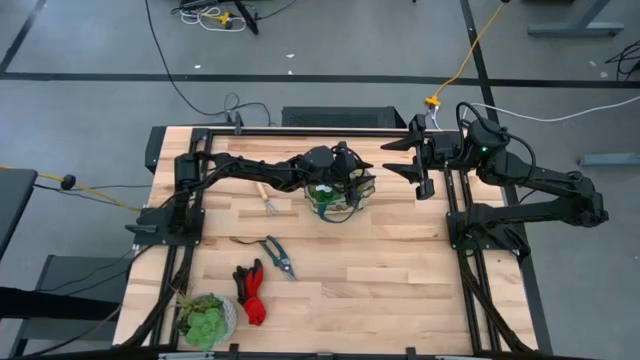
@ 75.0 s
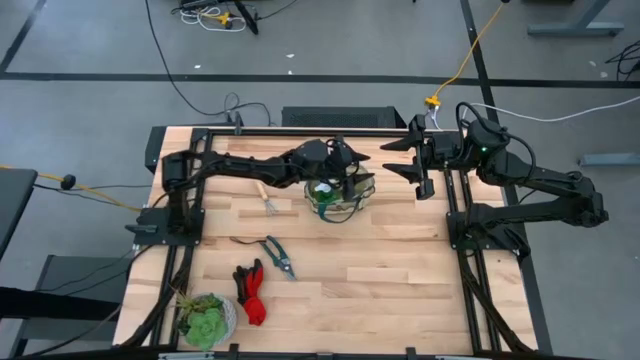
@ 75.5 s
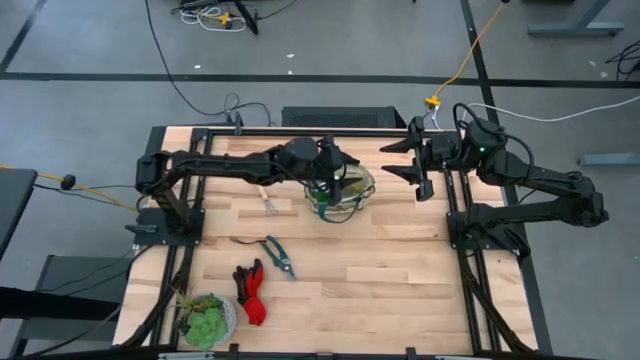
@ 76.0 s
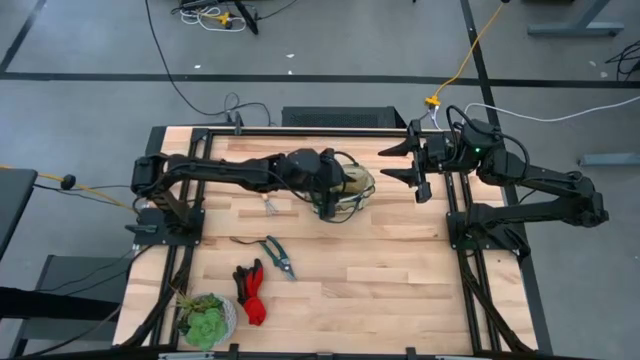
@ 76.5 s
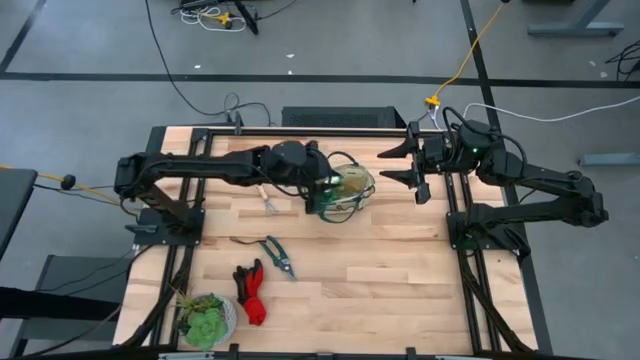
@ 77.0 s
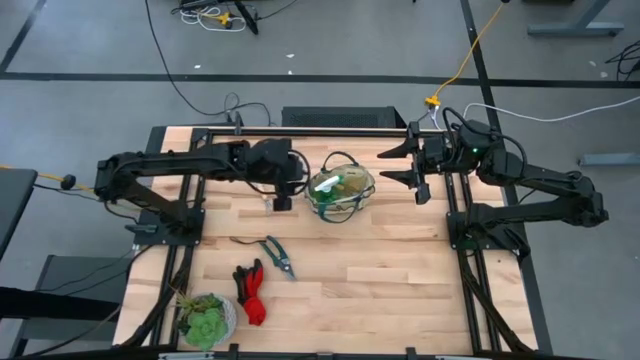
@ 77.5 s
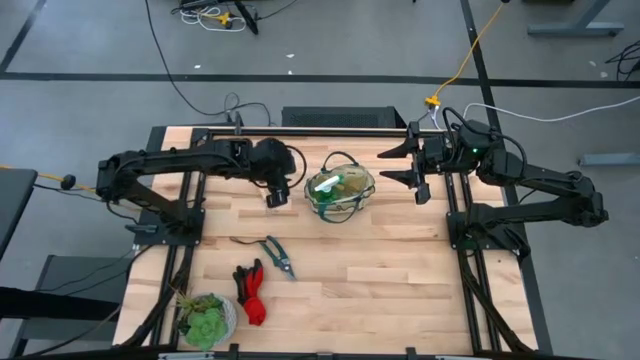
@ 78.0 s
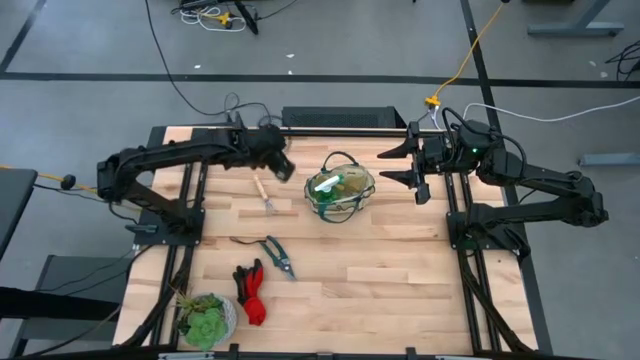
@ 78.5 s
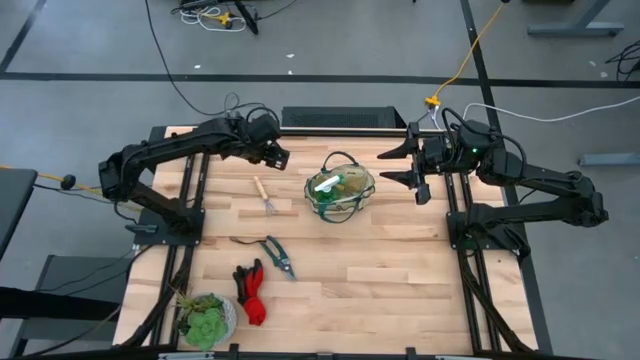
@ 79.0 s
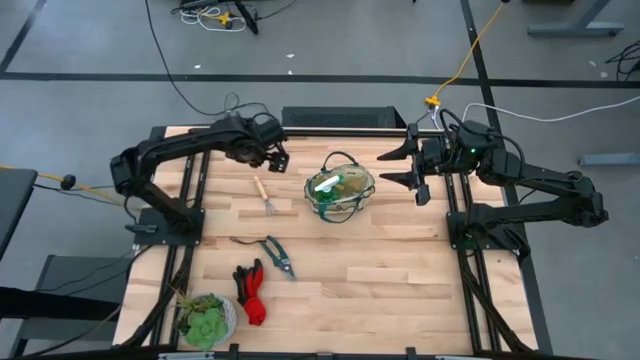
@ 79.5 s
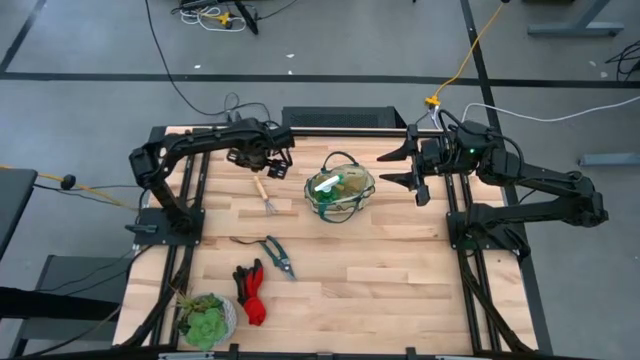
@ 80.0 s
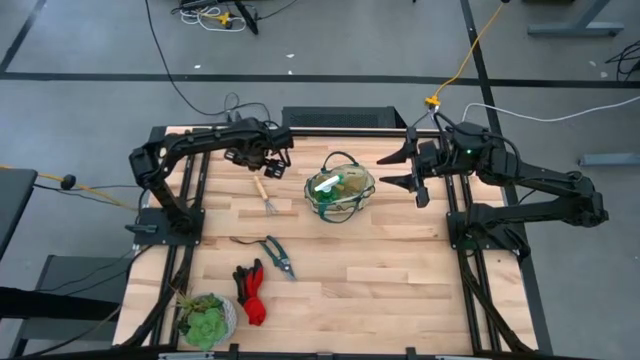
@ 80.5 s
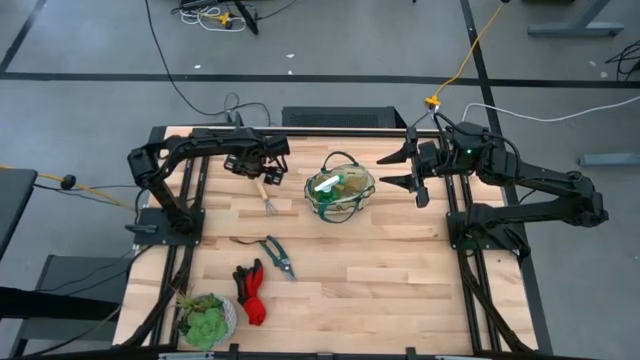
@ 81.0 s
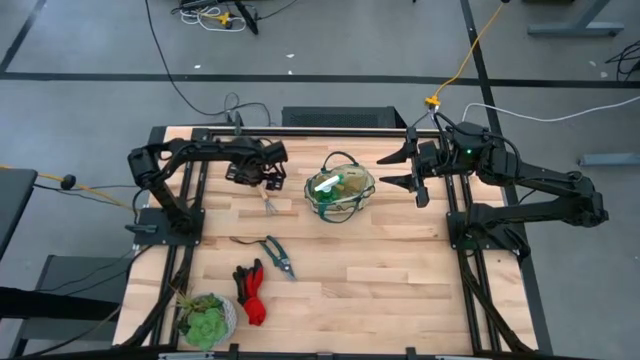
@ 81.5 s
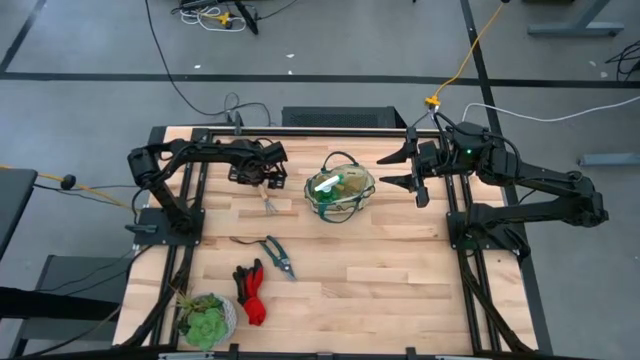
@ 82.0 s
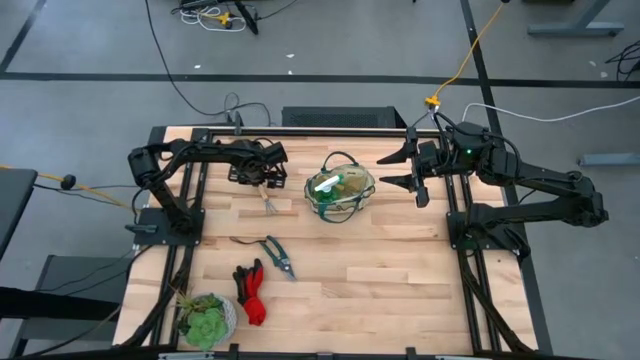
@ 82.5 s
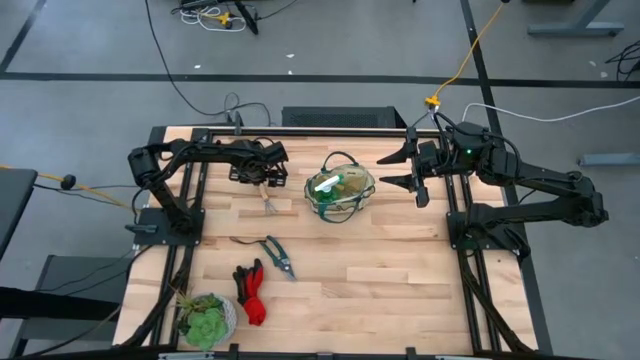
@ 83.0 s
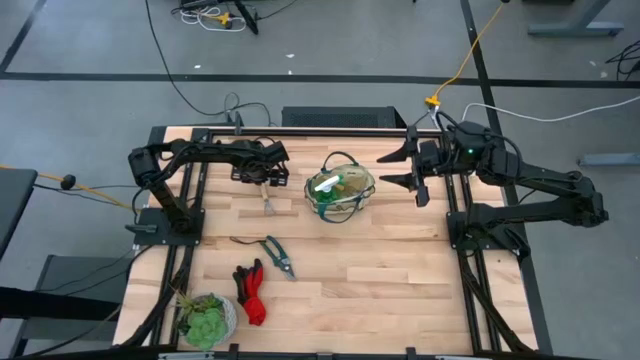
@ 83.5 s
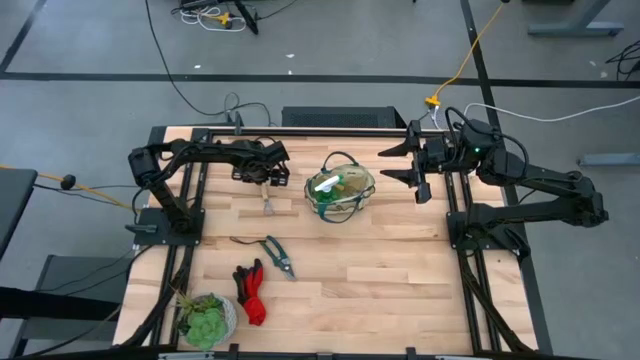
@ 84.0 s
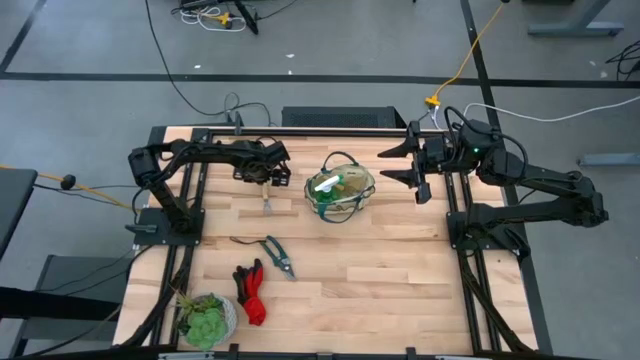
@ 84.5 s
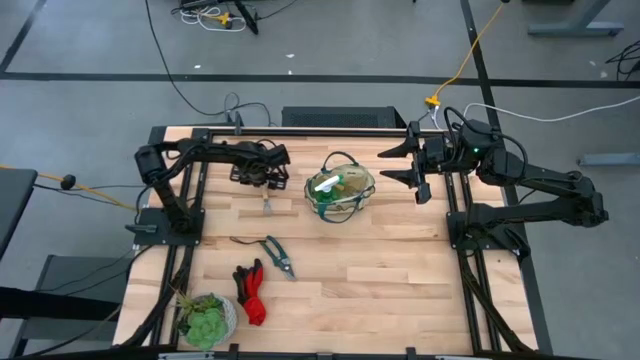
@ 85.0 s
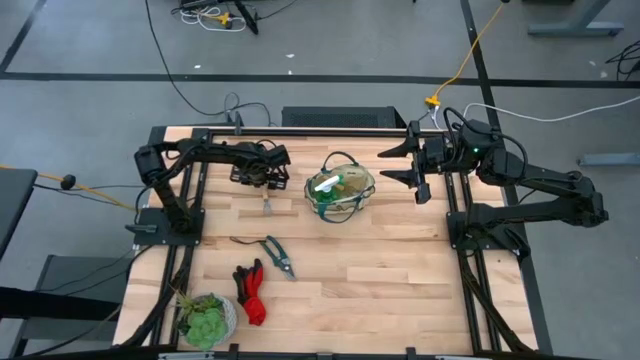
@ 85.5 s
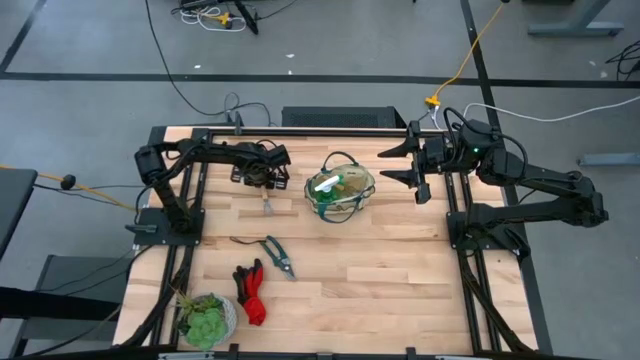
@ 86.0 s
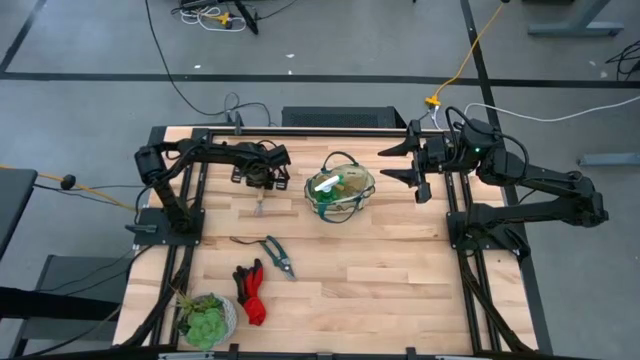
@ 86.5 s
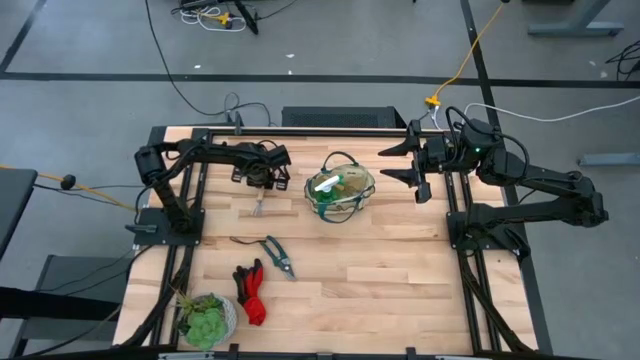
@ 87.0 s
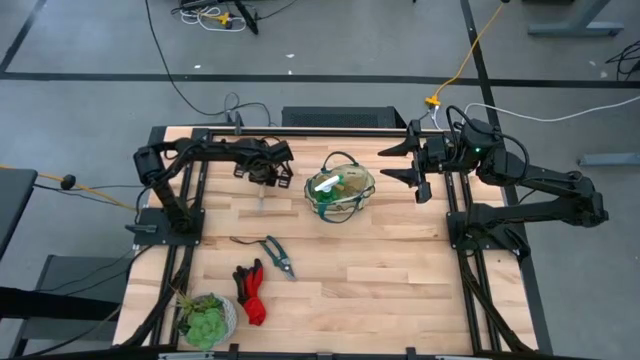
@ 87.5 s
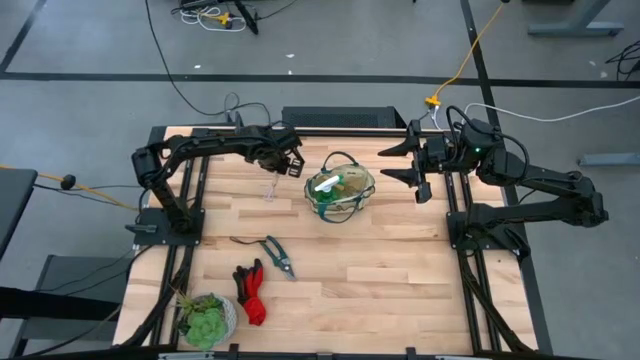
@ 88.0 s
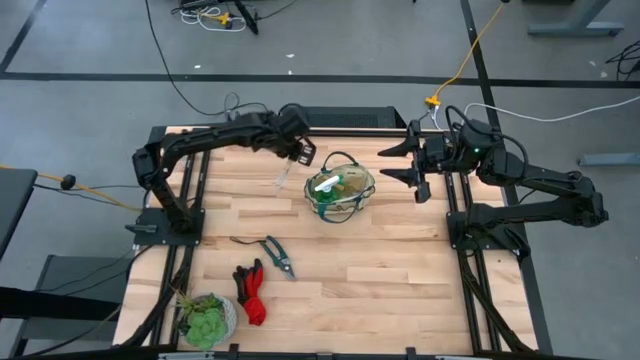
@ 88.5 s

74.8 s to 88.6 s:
Task: Pick & Place Garden tools in Gardening bag
Put the brown hand rake into the gardening bag

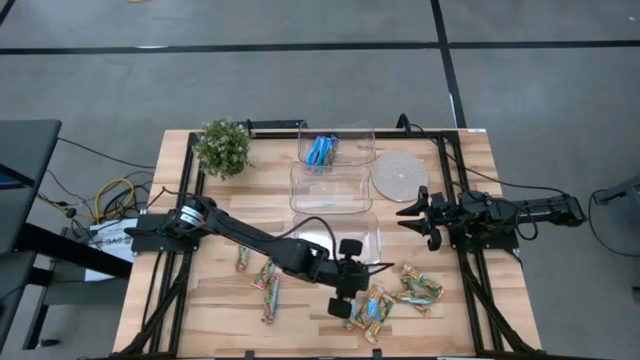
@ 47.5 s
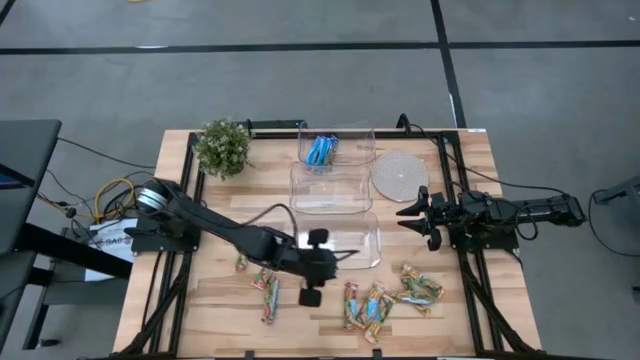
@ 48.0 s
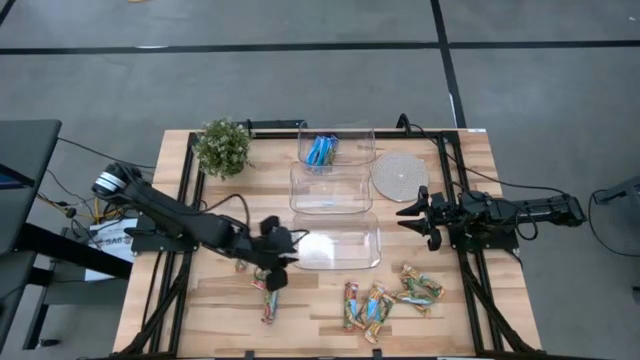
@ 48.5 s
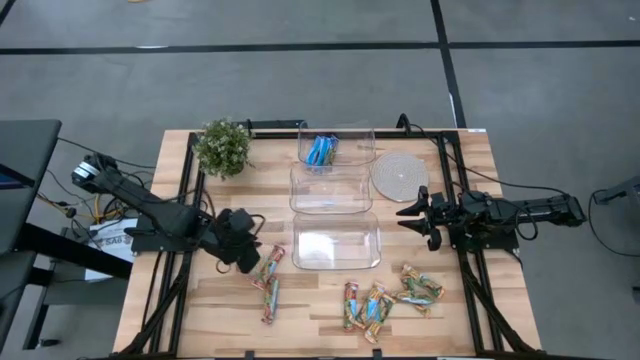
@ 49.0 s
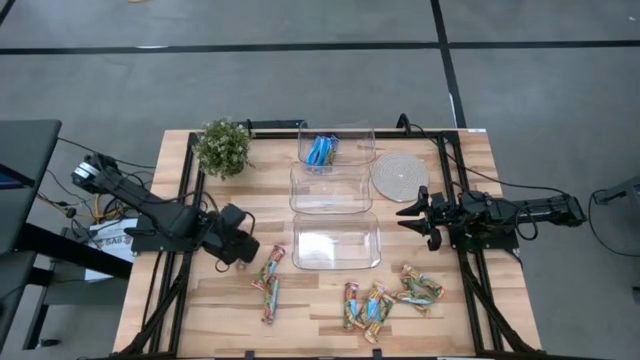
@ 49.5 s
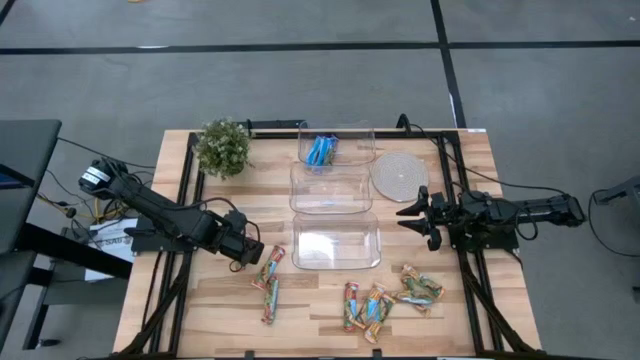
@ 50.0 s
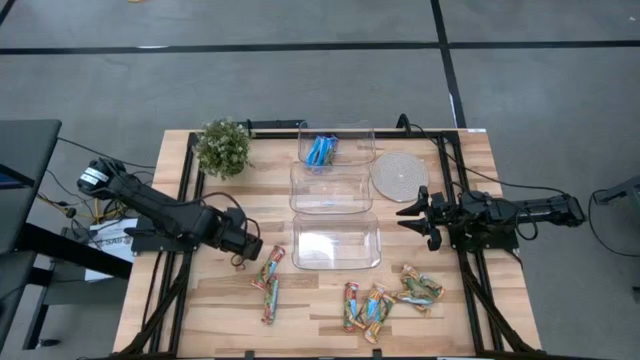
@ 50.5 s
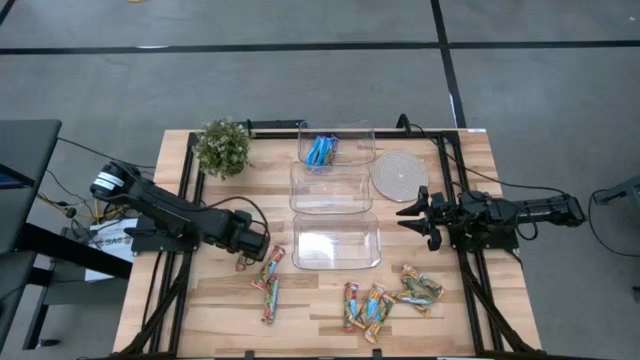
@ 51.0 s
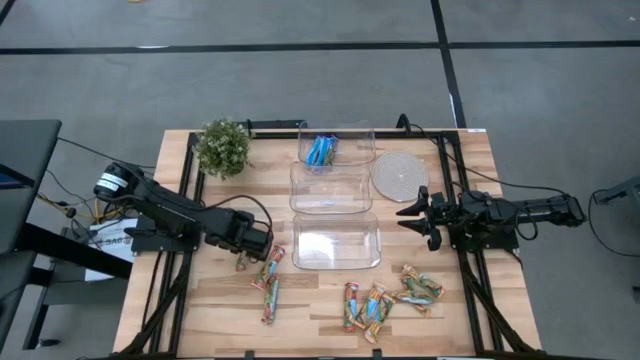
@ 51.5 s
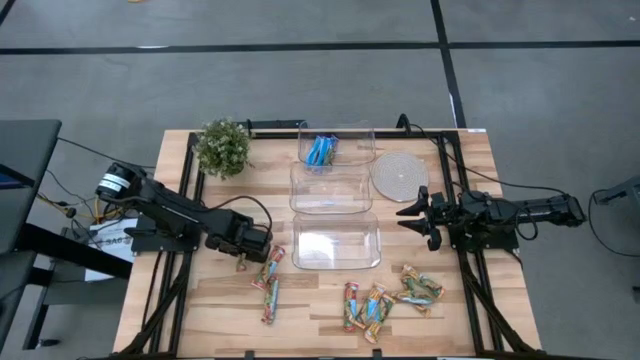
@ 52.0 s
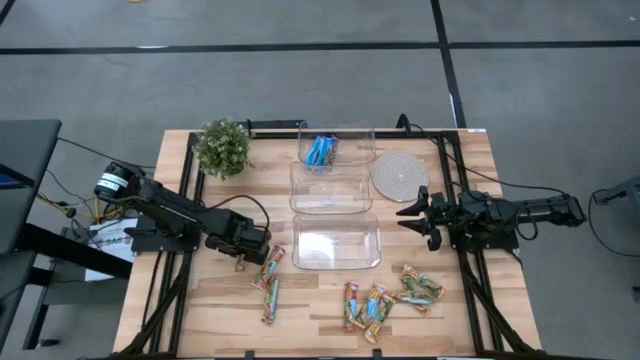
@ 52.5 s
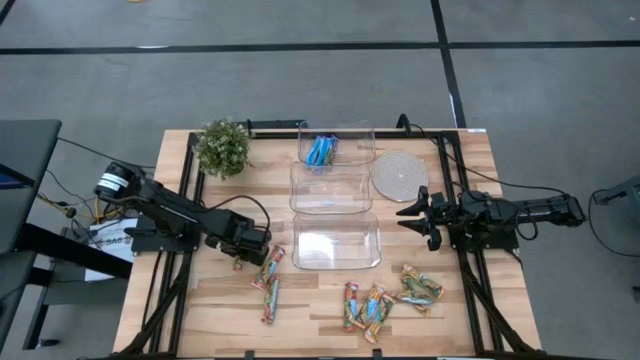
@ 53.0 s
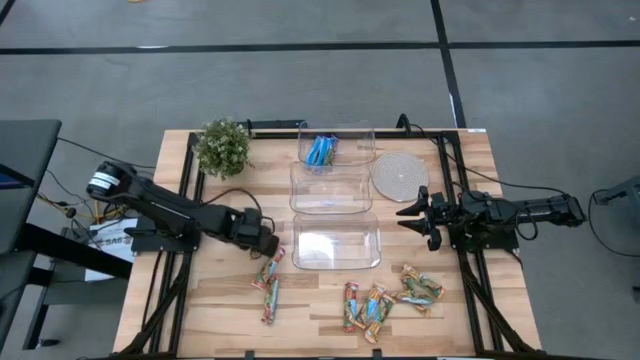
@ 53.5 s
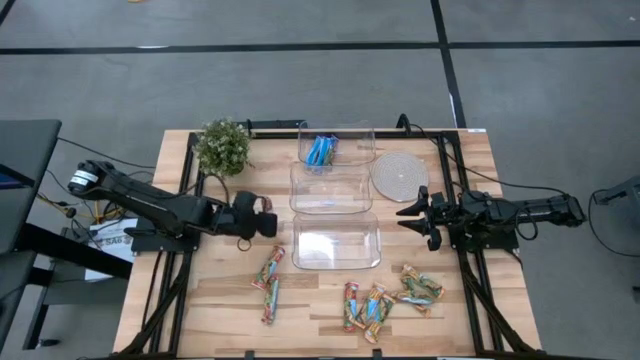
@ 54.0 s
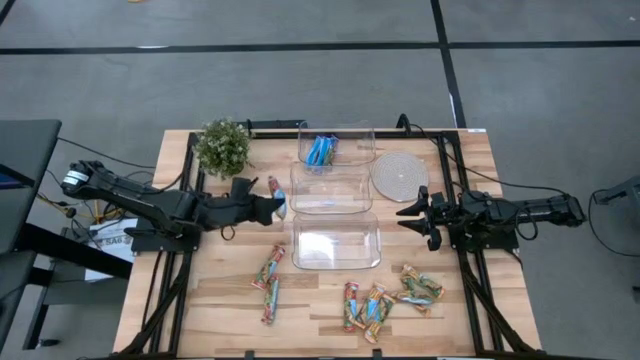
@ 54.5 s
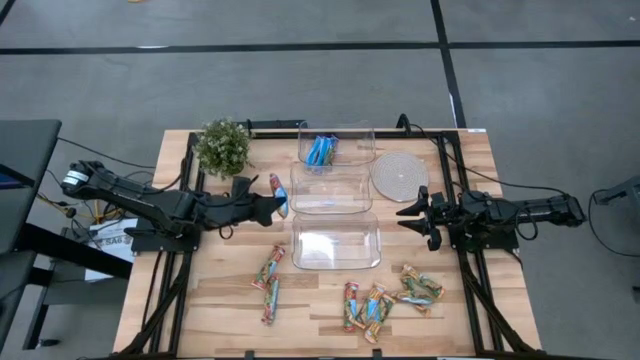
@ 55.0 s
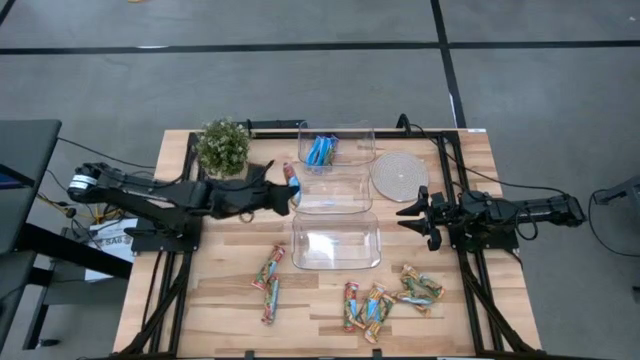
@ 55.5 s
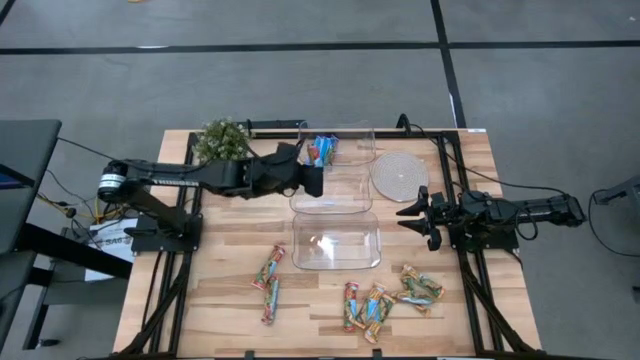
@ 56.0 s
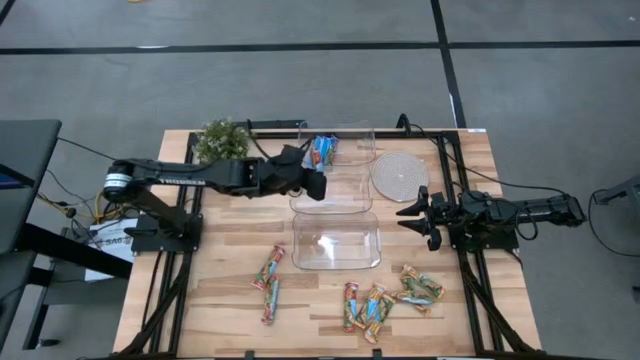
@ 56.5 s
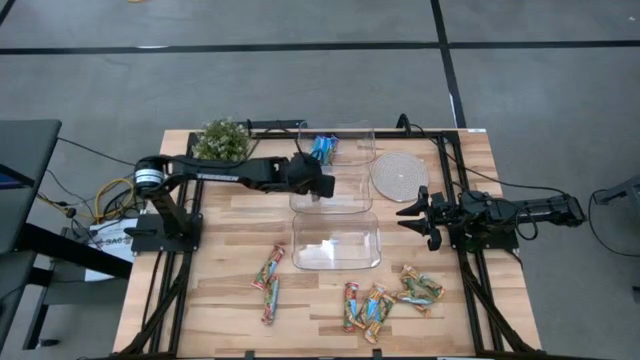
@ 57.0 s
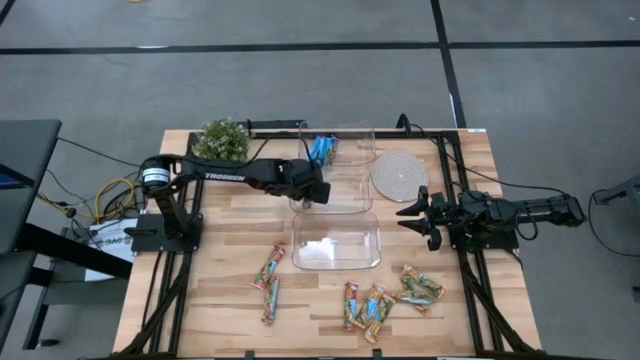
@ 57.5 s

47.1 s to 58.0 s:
Task: Pick and place Granola Bars by type
Put the red granola bar into the middle transparent bin
